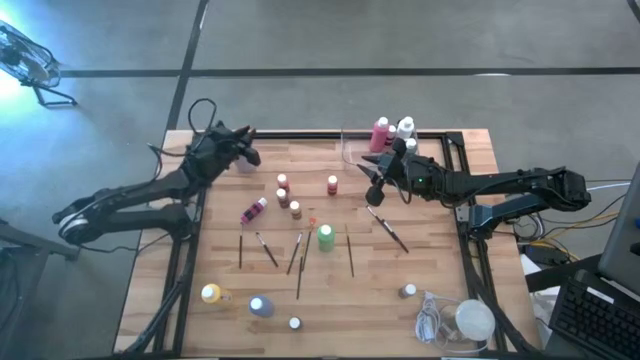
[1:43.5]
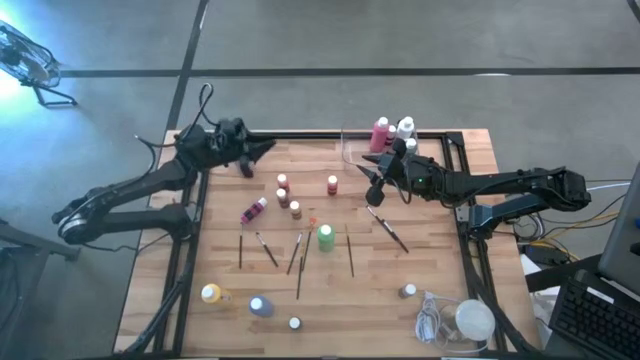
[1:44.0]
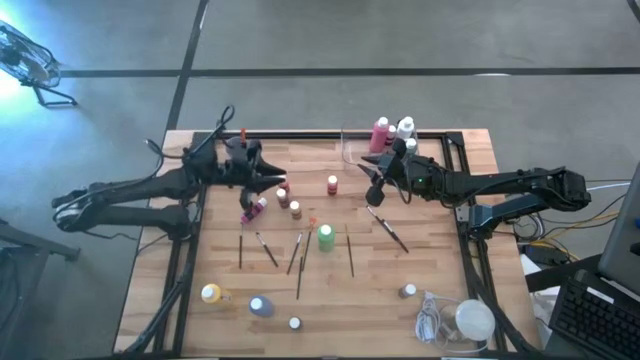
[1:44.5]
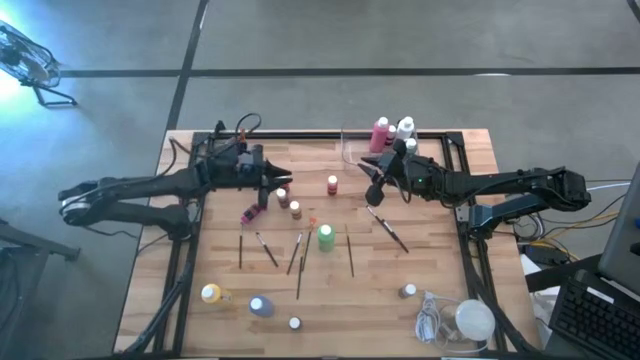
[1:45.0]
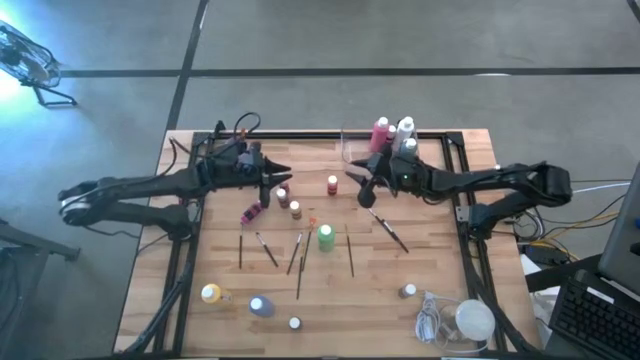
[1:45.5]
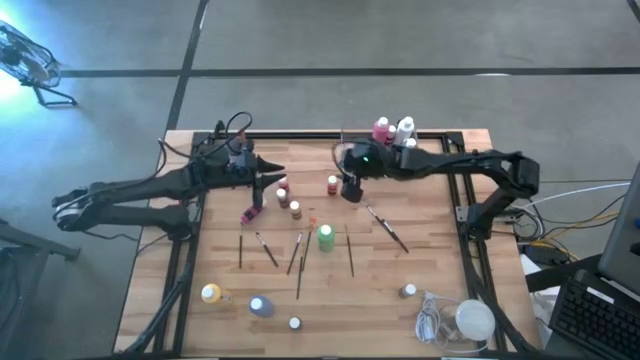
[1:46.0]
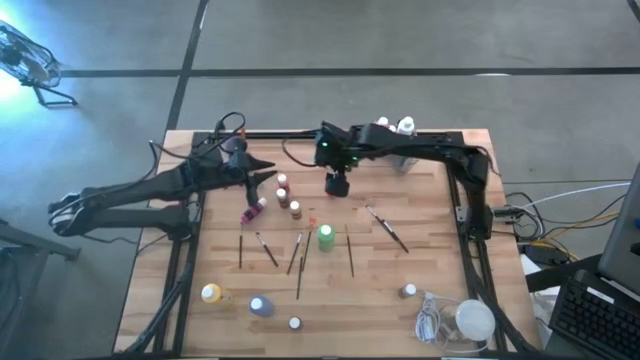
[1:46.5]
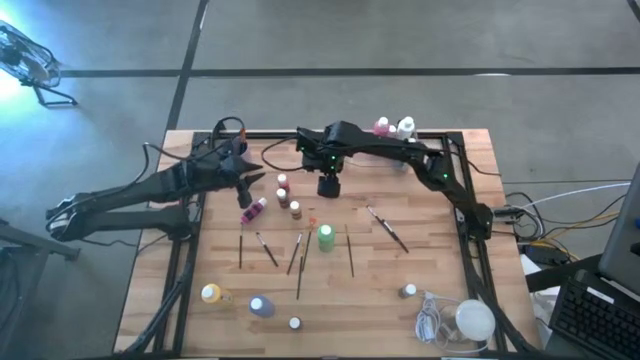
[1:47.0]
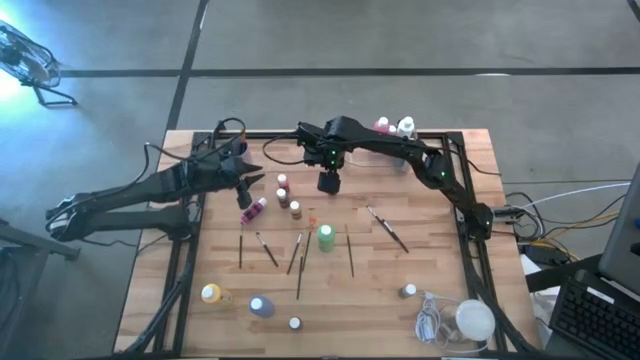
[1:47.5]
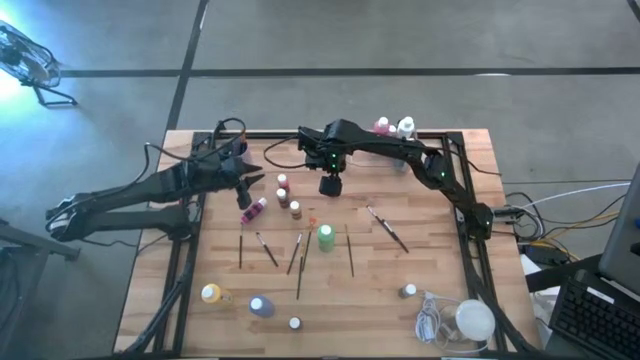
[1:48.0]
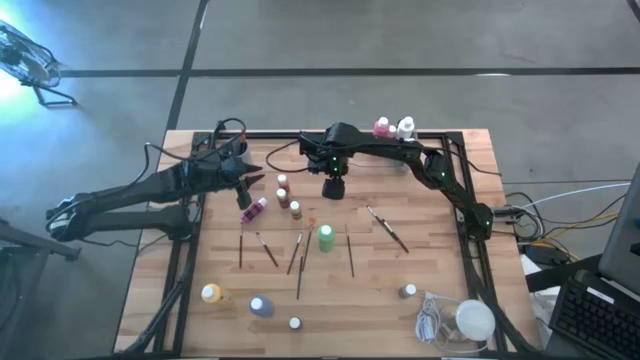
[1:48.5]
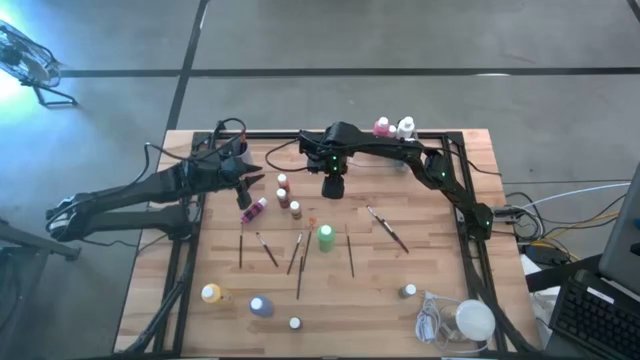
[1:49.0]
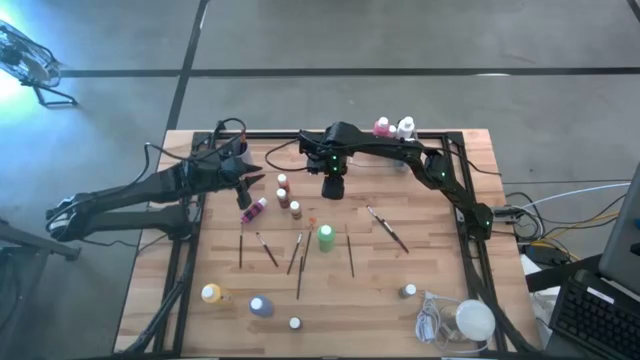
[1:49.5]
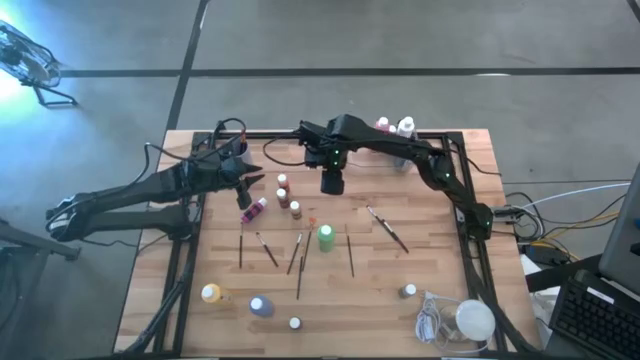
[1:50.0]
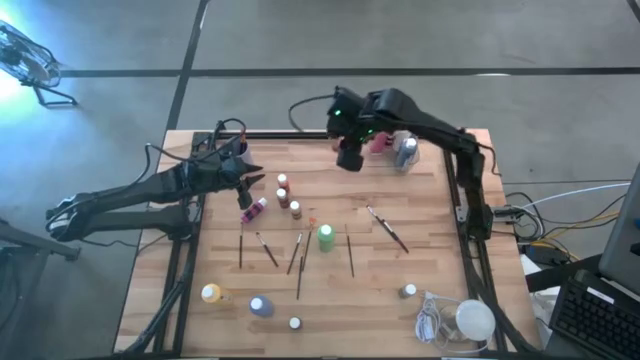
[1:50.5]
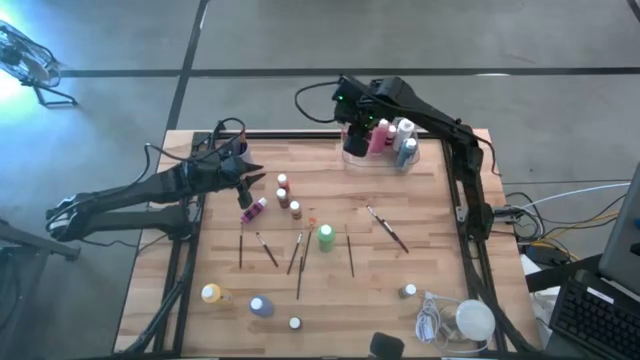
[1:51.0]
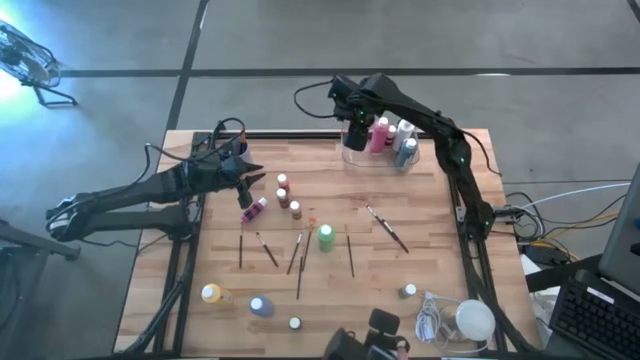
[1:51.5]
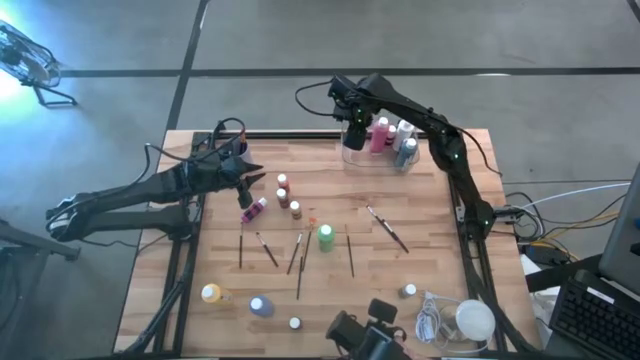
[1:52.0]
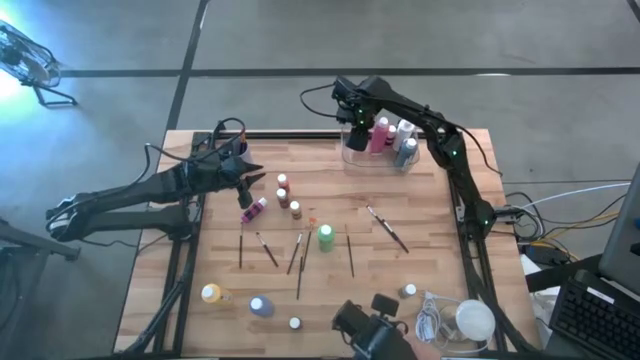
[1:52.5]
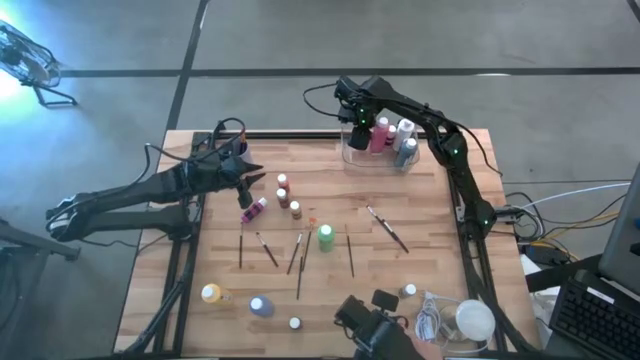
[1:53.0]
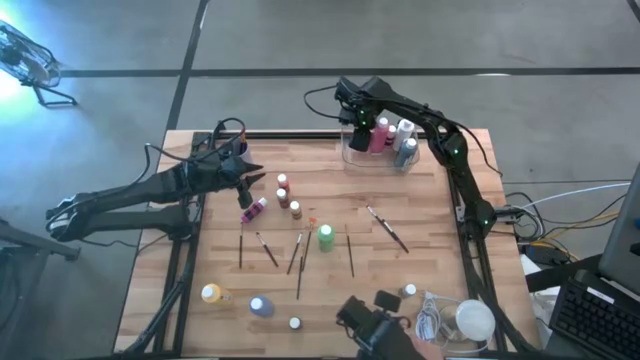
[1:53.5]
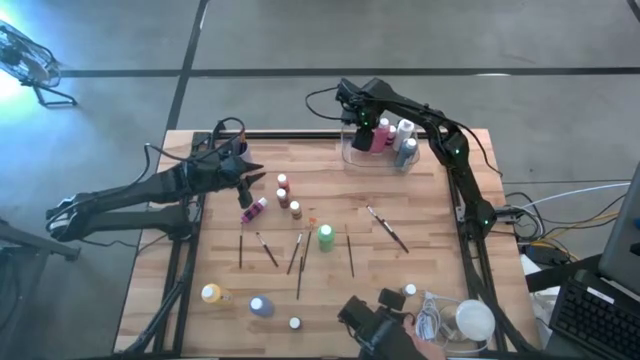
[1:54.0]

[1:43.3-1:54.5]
Task: Pick & Place Paint Supplies
Put the orange paint bottle into the transparent bin

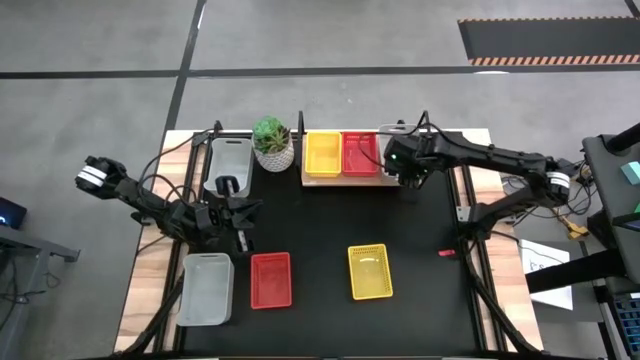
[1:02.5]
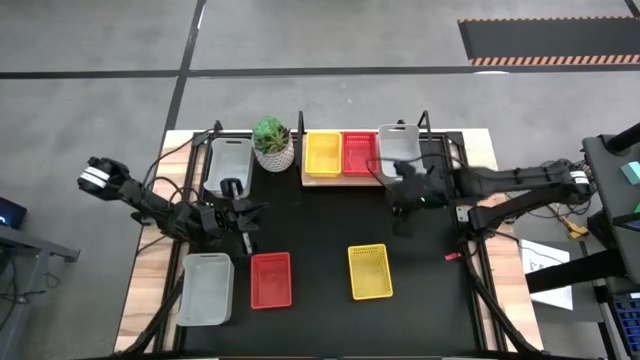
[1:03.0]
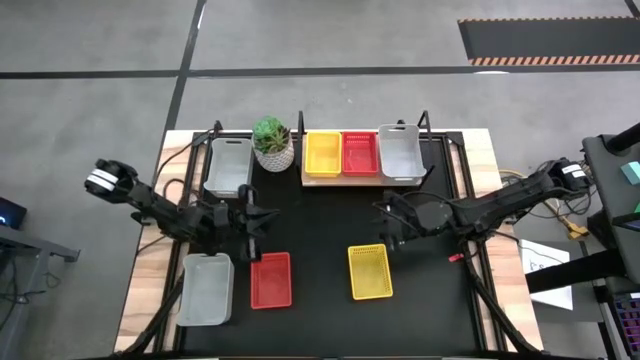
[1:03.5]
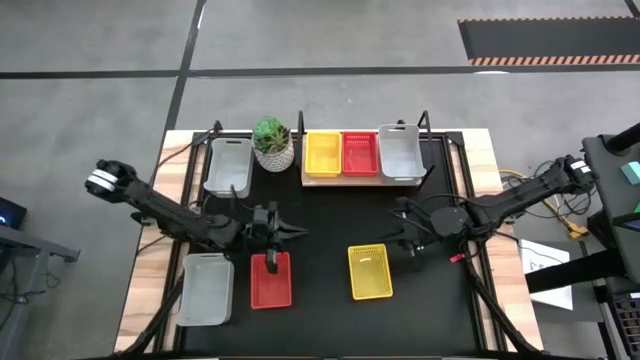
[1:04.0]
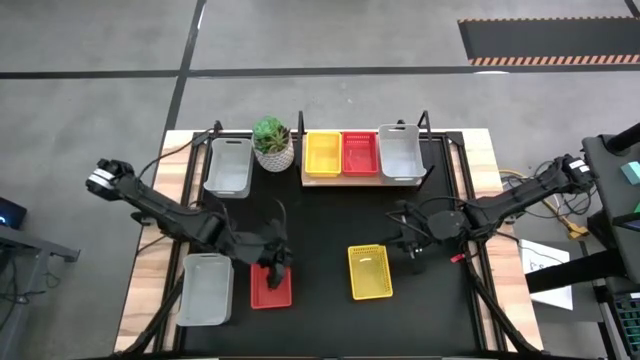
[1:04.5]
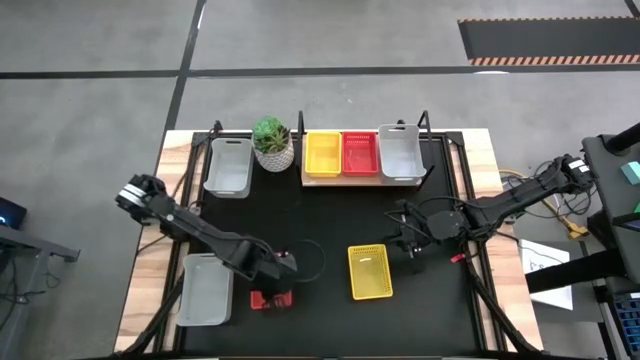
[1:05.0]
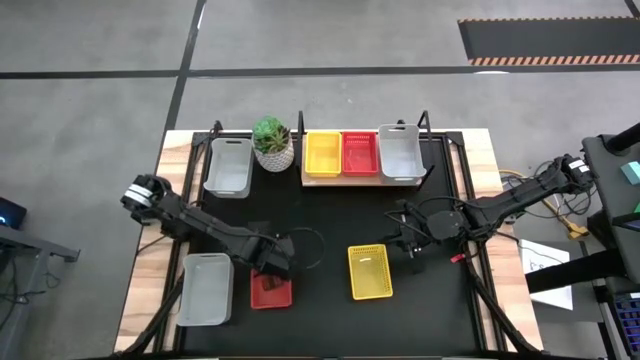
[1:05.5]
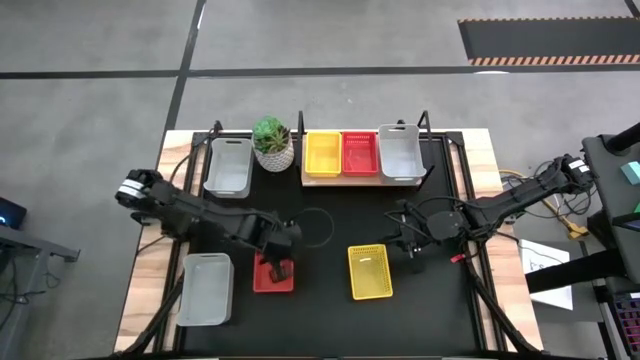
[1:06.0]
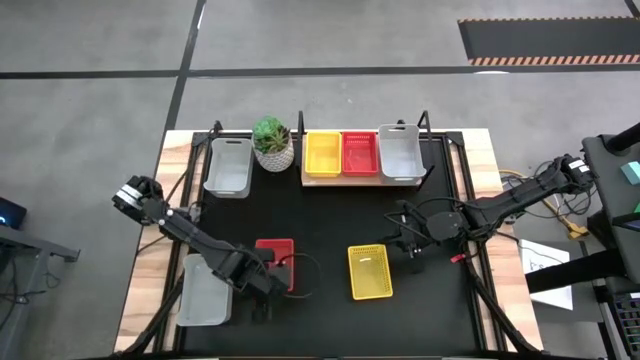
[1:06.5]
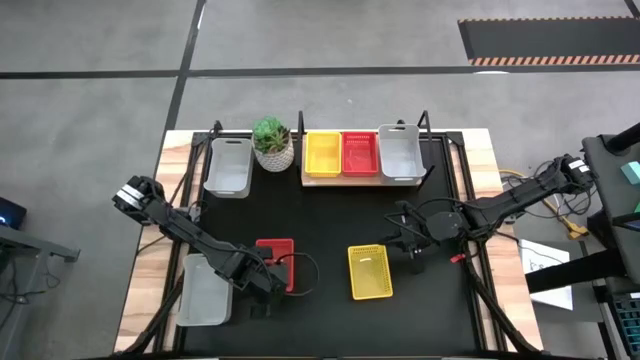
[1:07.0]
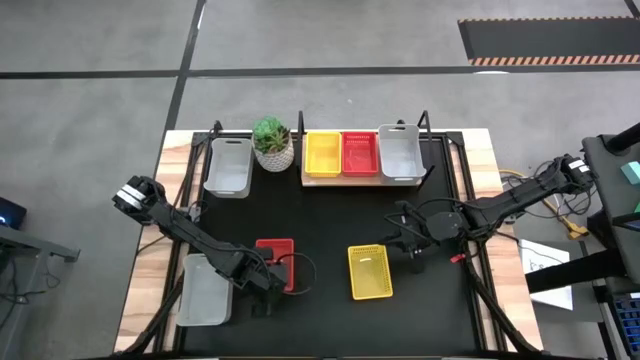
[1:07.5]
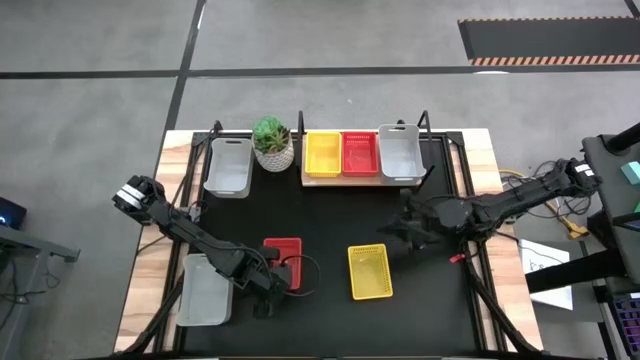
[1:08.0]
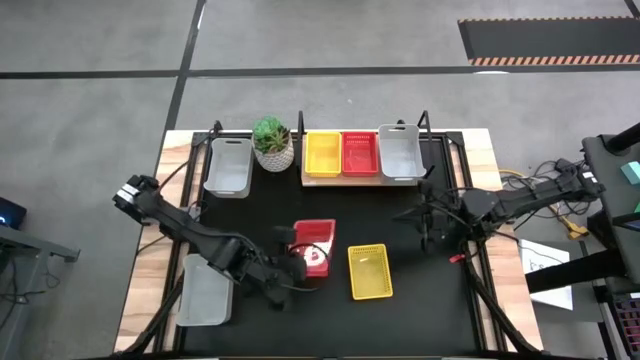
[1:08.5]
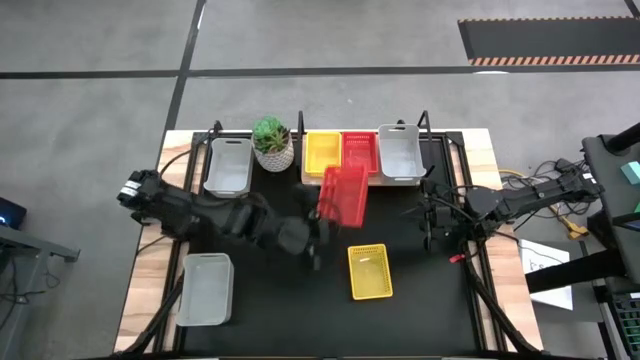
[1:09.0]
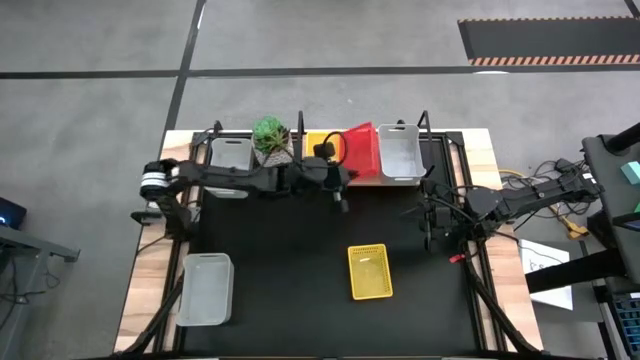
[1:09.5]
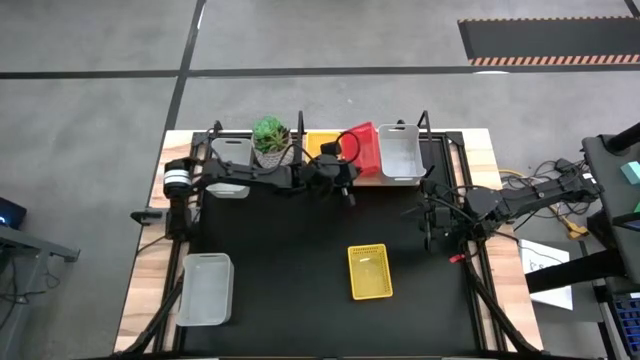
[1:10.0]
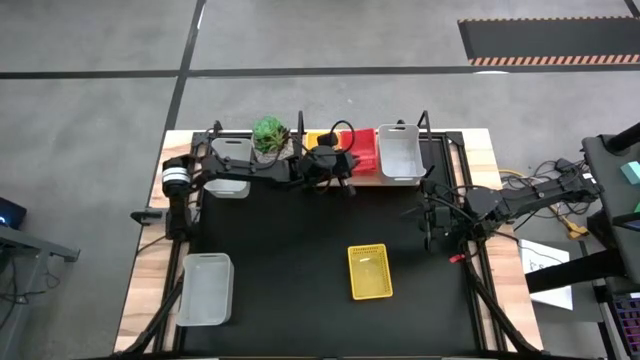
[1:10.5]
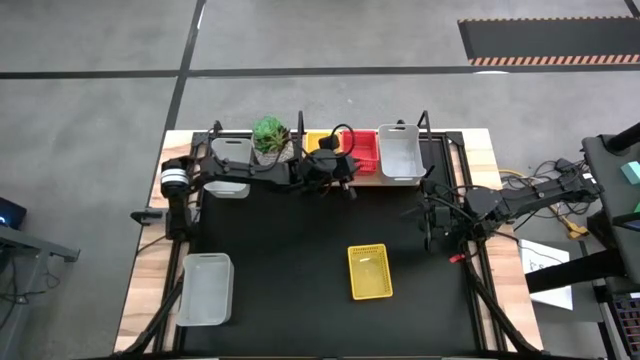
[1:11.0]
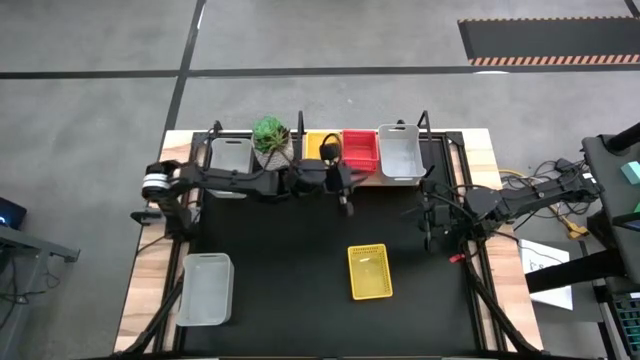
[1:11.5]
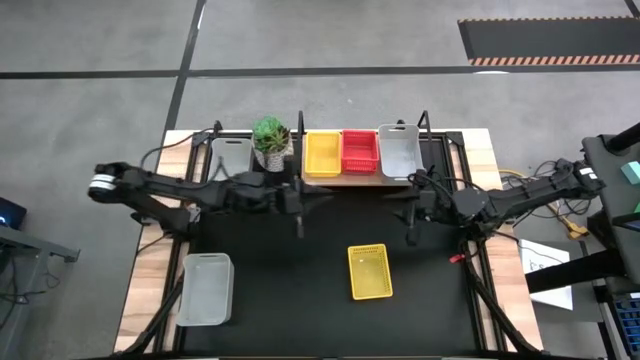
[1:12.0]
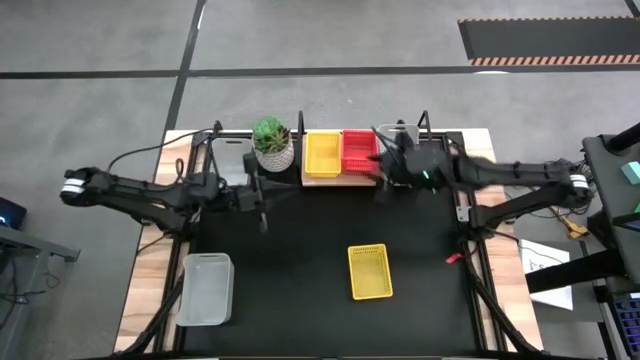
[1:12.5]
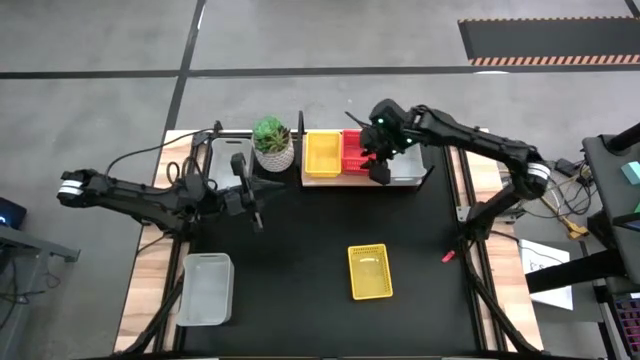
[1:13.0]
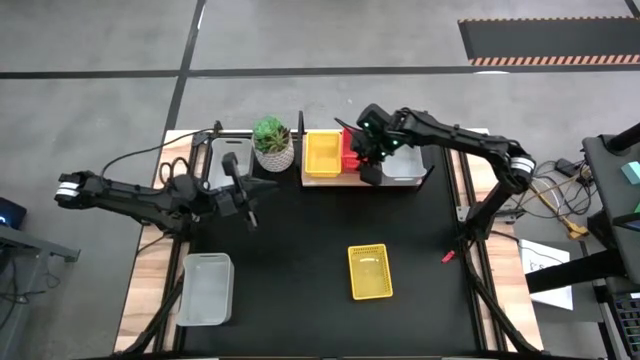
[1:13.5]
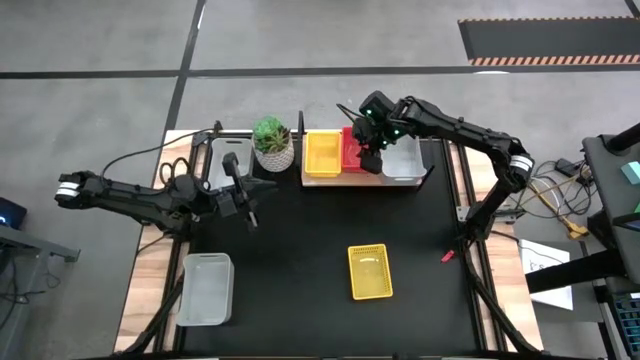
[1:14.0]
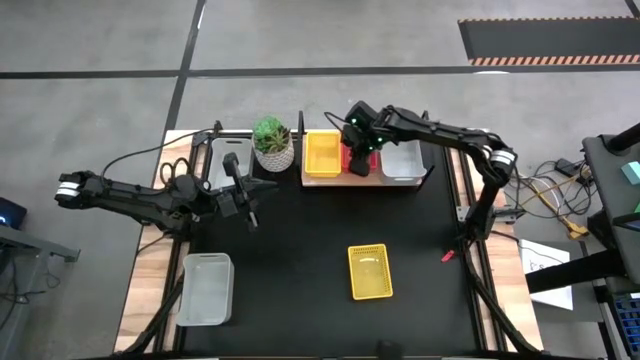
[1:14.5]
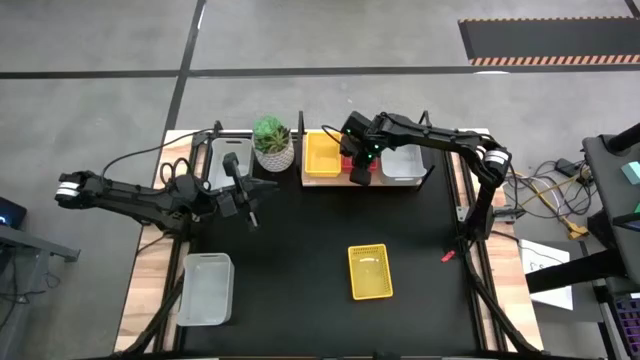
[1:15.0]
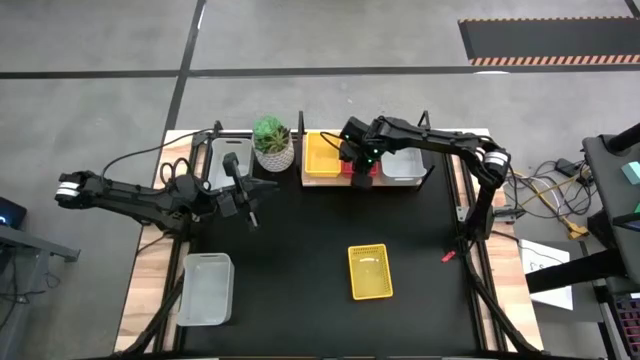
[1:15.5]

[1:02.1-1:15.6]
Task: Stack baskets on shelf by color
Stack the red bin on top of red bin on the shelf
